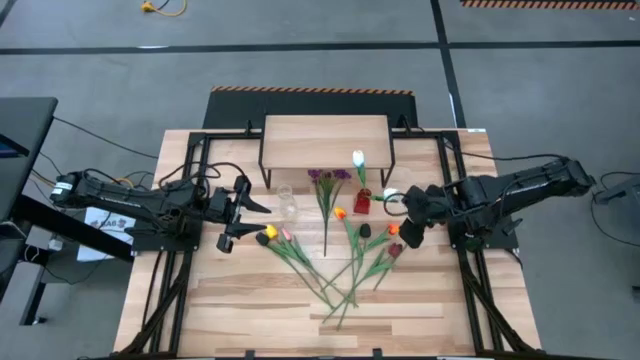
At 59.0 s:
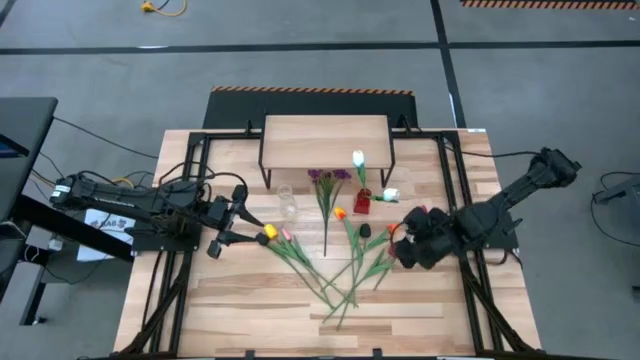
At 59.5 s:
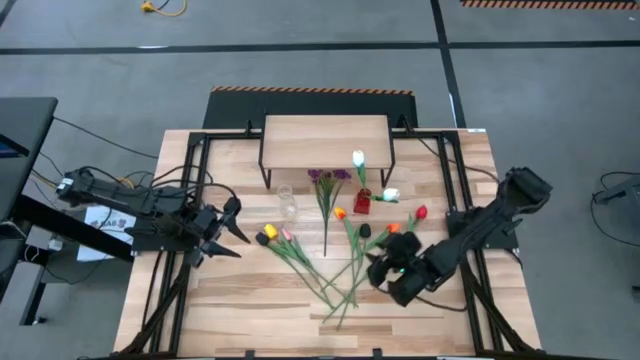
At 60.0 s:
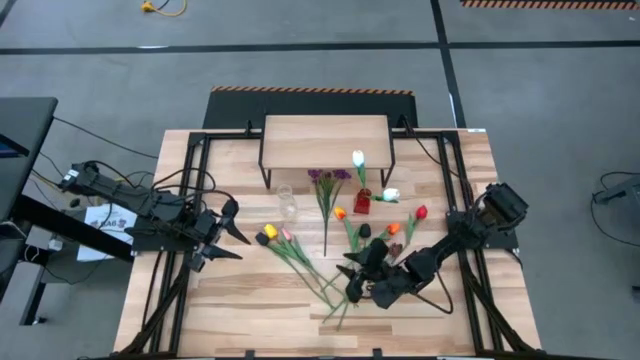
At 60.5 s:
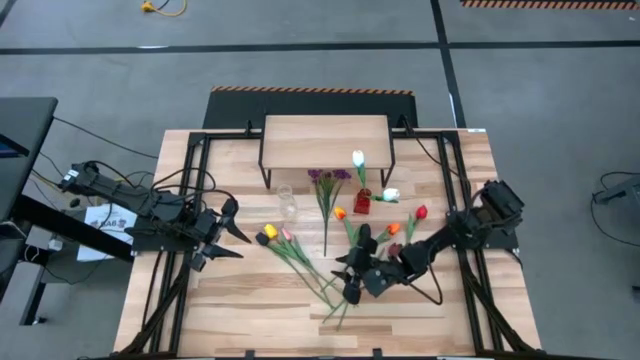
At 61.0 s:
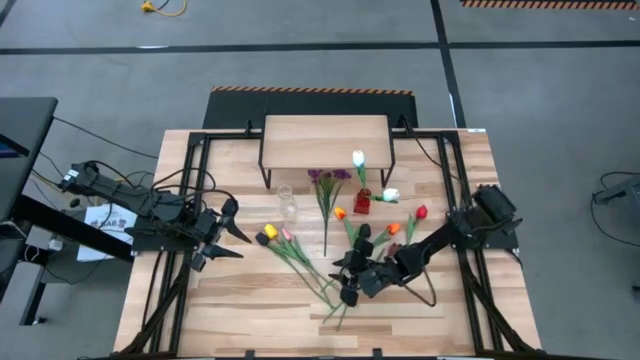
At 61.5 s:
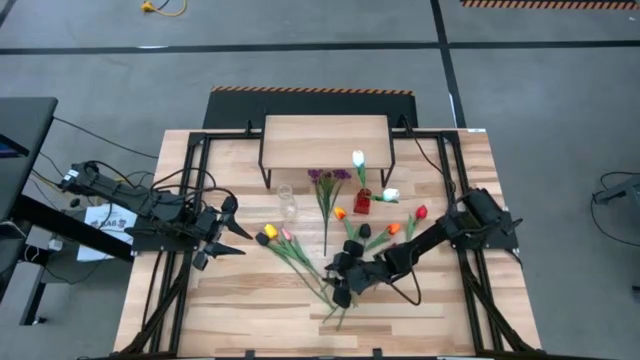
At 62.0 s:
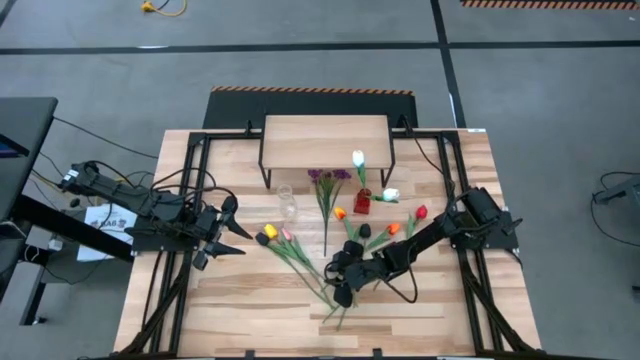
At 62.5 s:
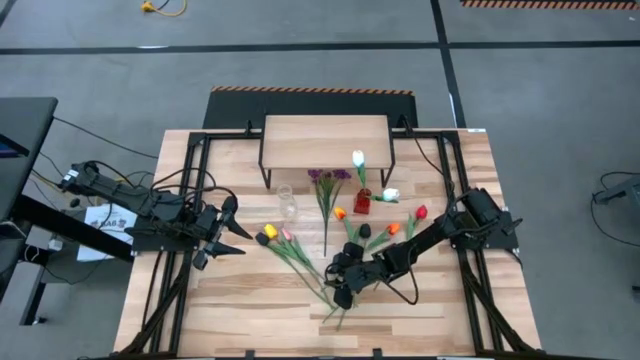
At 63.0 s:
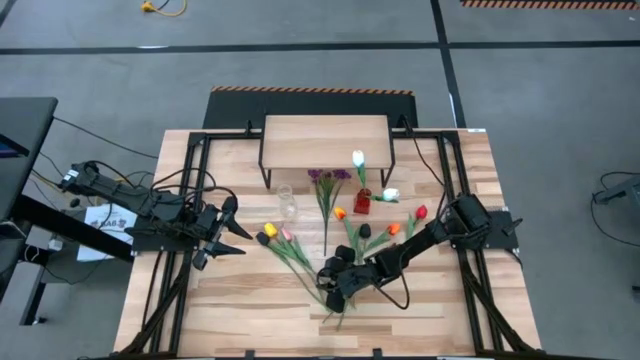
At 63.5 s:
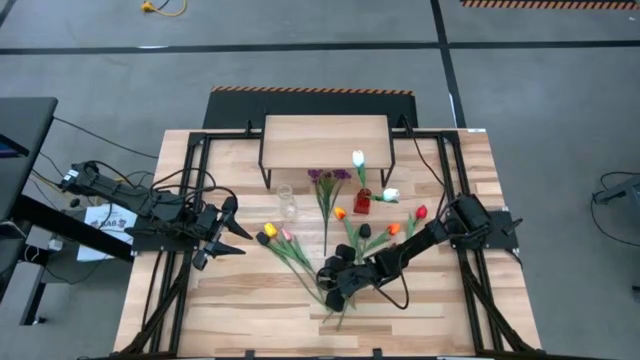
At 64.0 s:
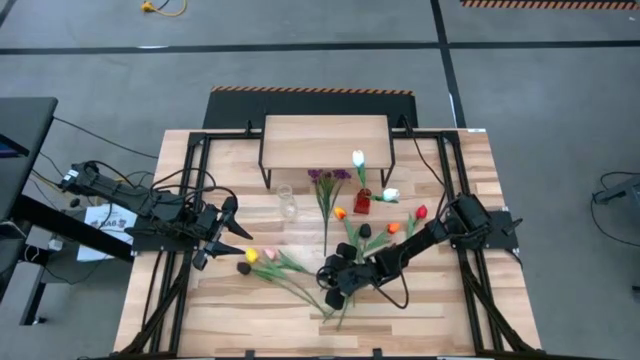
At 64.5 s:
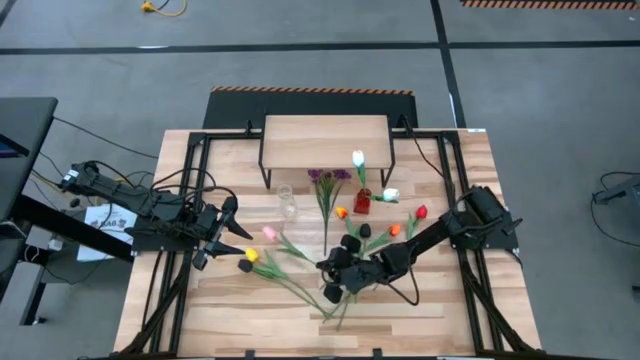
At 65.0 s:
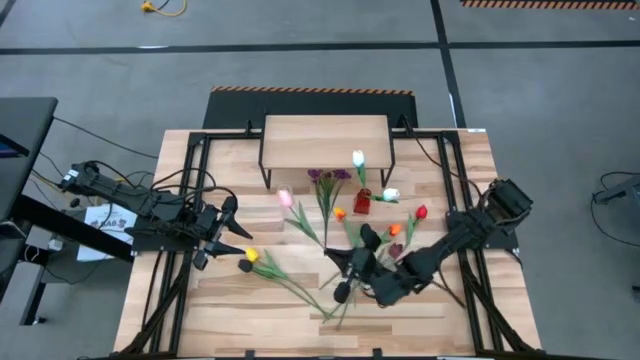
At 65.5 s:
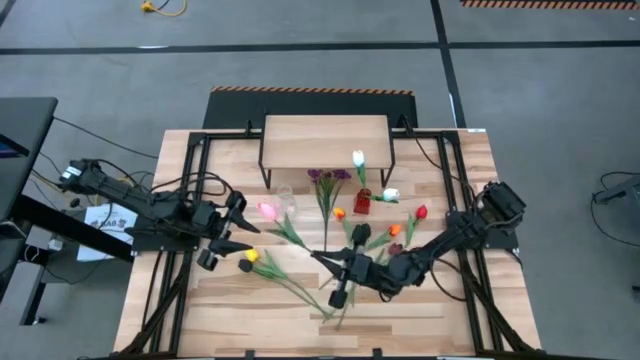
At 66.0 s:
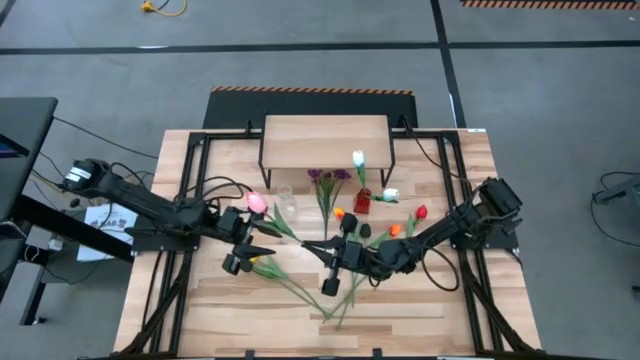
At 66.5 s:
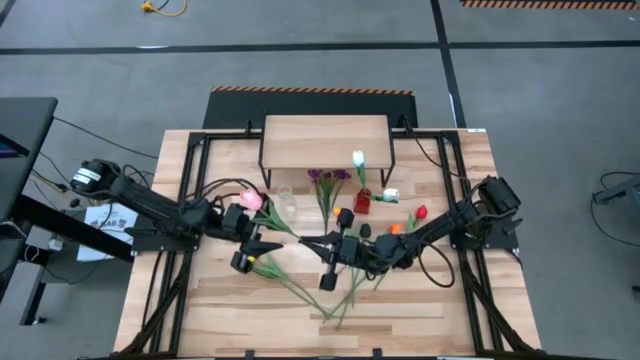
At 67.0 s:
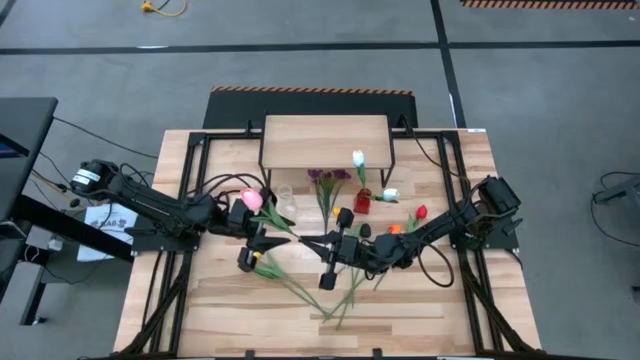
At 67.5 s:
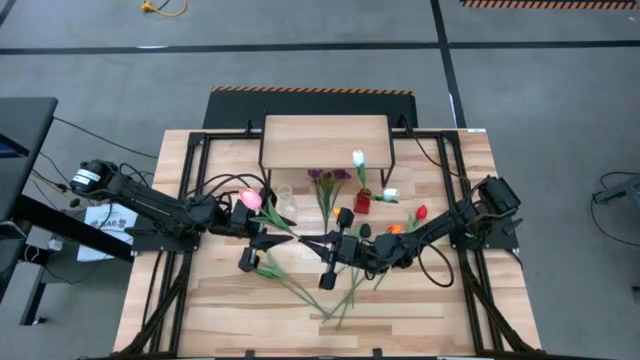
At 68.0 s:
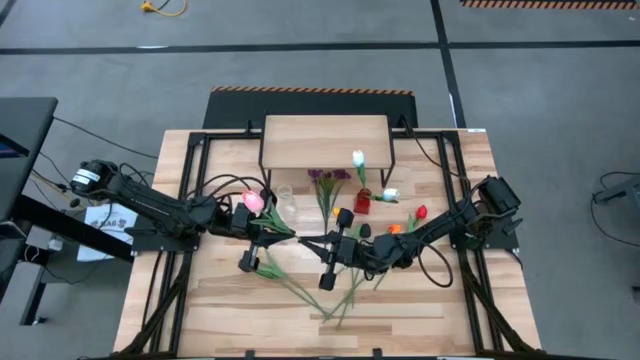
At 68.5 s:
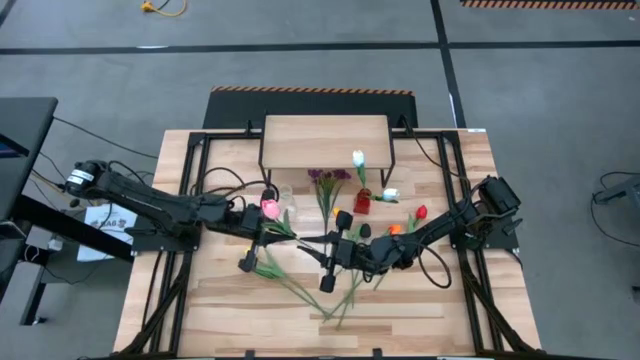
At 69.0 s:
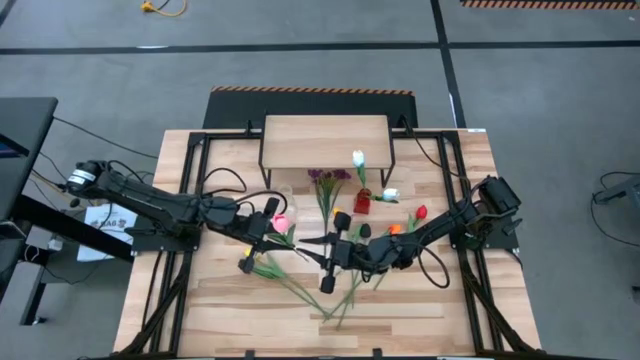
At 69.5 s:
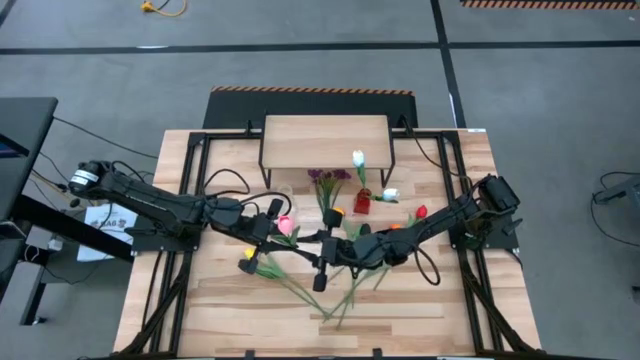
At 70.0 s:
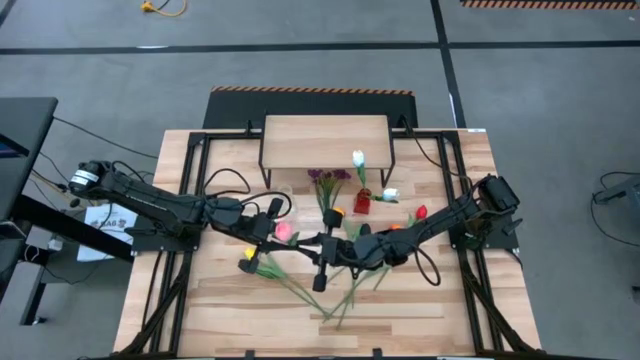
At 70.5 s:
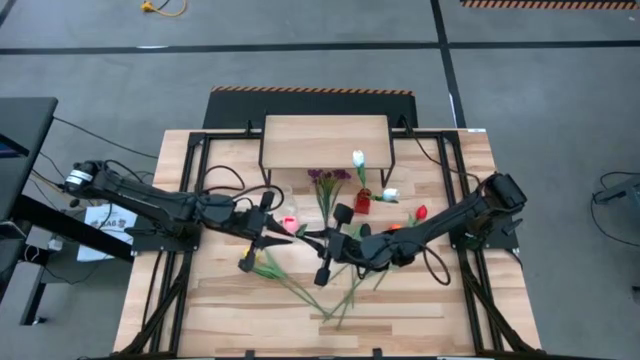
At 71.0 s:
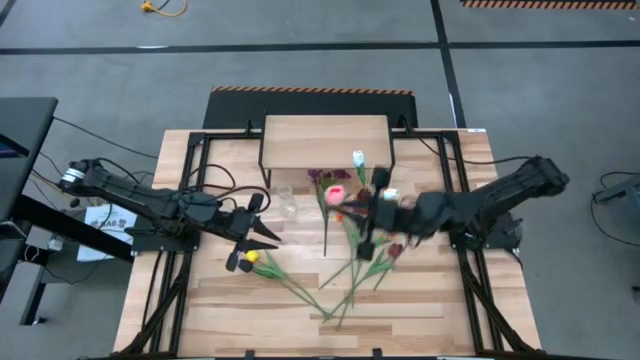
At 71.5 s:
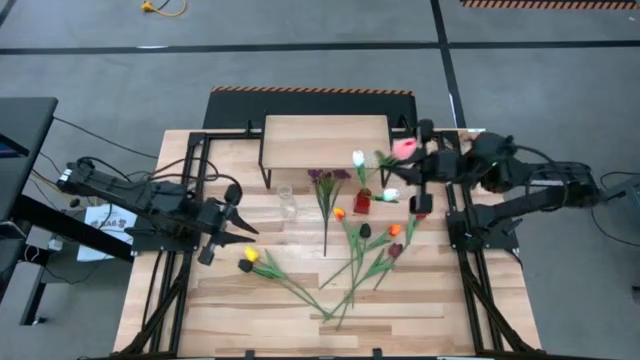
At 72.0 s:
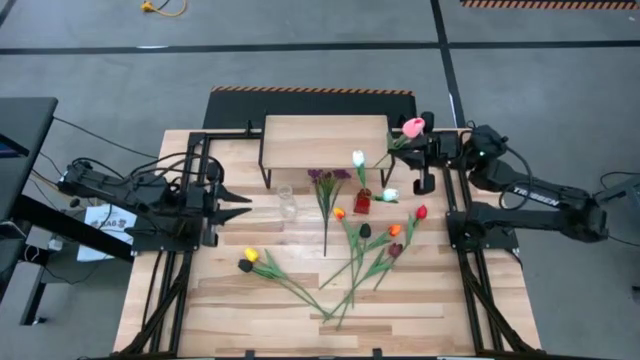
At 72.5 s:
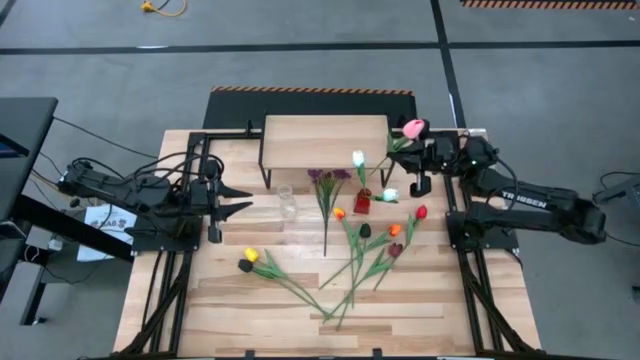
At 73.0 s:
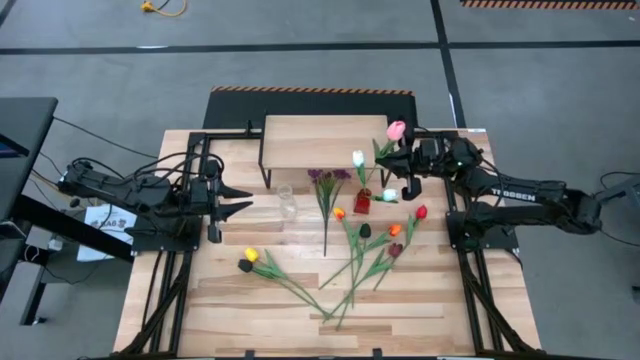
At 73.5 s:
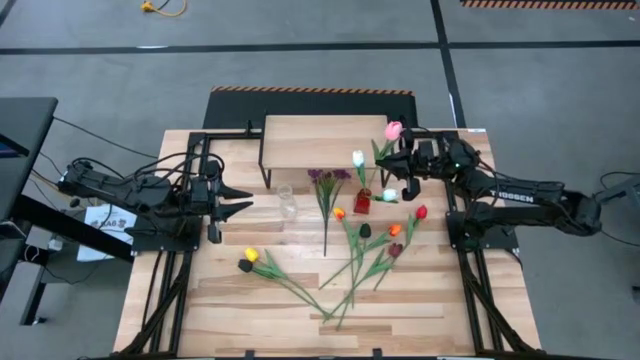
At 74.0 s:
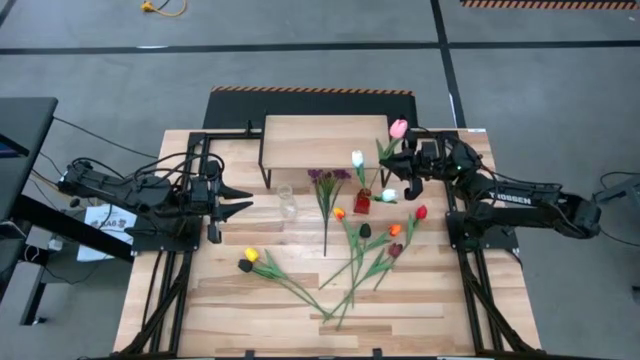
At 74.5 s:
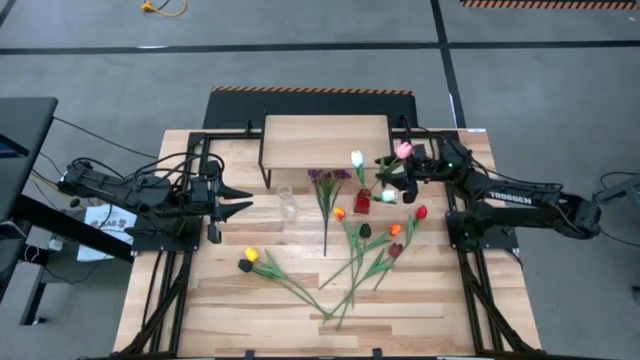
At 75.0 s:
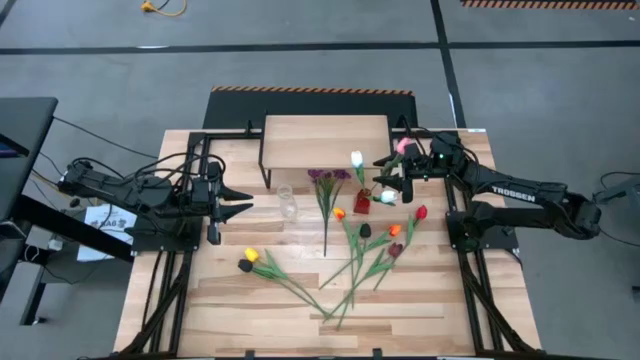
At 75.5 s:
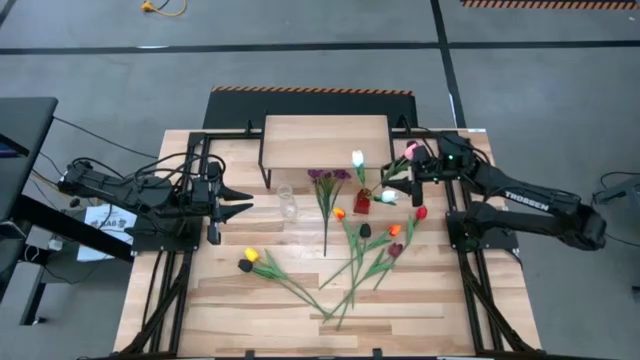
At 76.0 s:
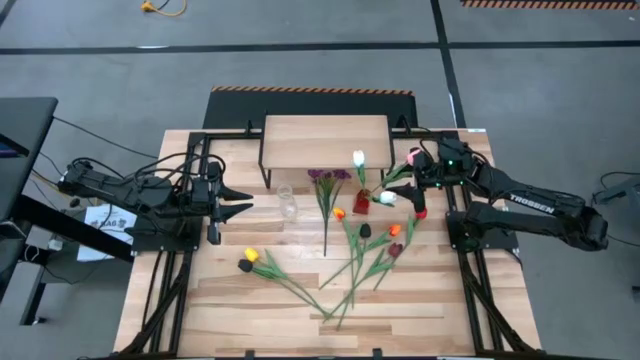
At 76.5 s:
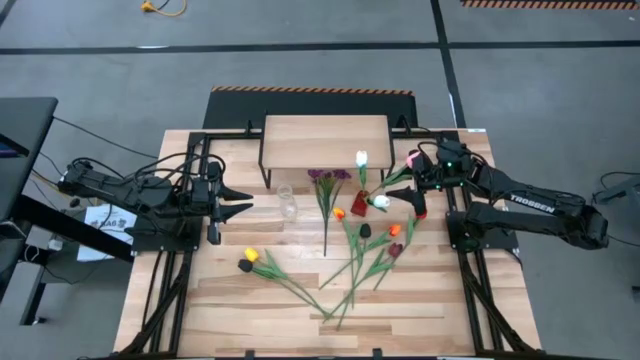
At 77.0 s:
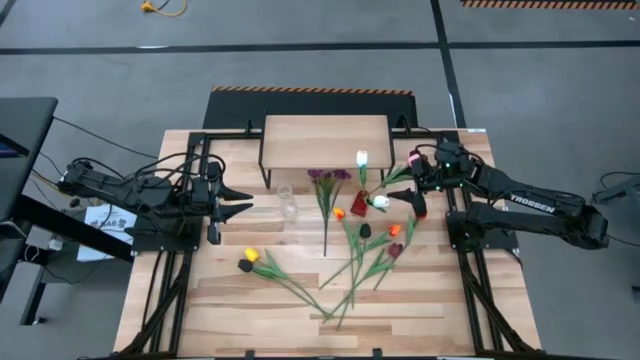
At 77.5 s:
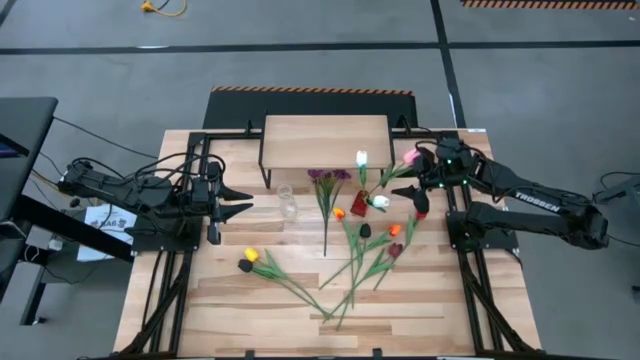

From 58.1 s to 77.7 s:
Task: Pick and place flowers into a vace then onto a shelf
Put the pink flower into the red flower vase

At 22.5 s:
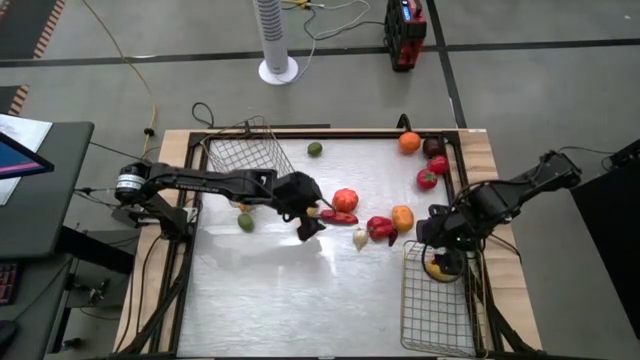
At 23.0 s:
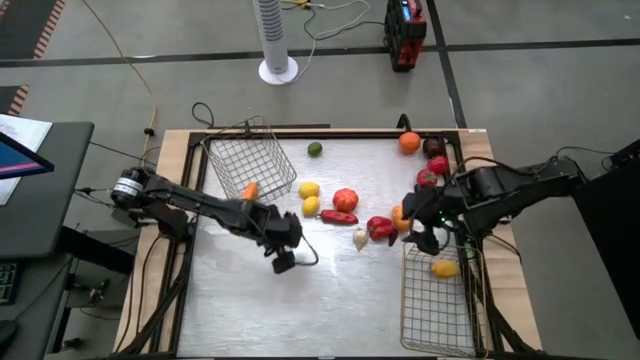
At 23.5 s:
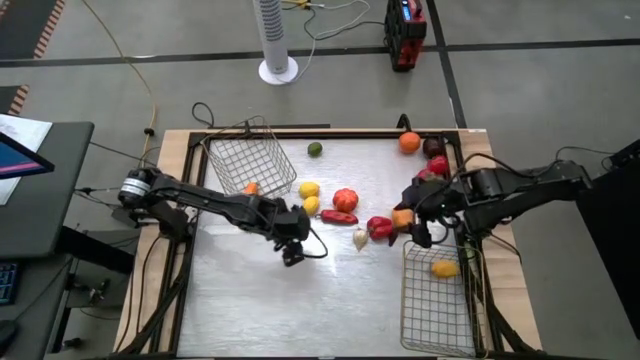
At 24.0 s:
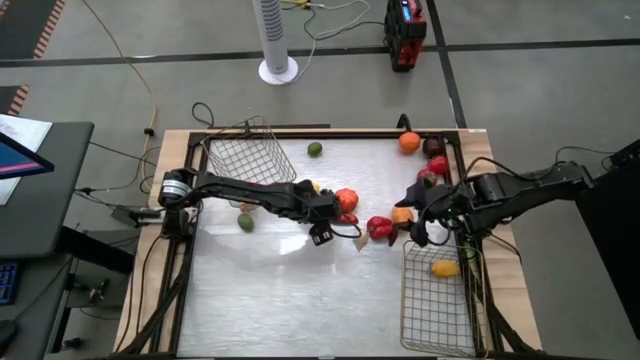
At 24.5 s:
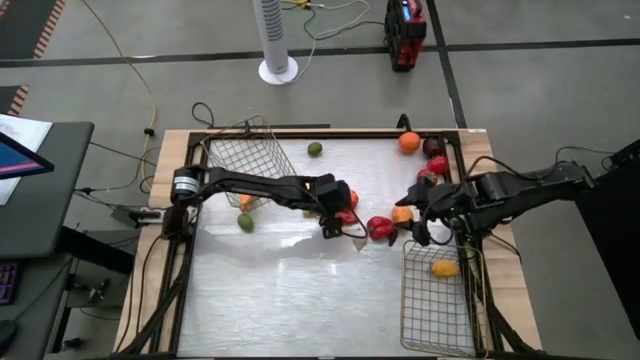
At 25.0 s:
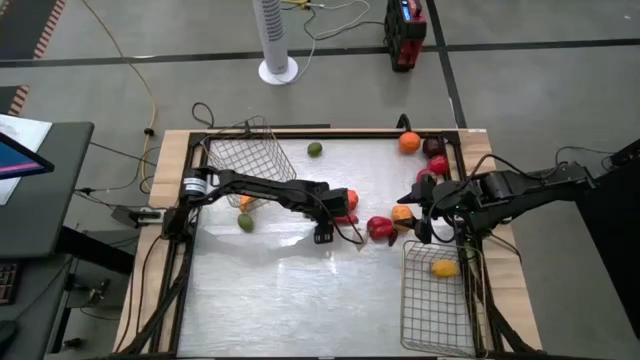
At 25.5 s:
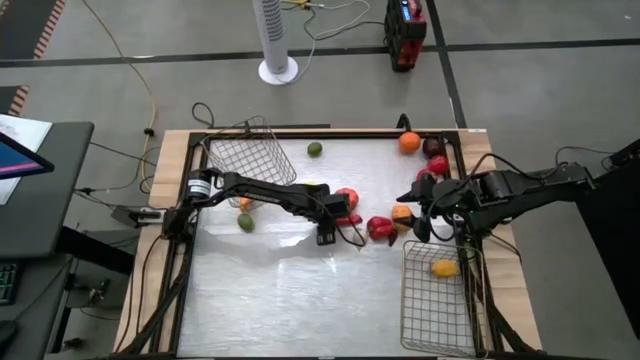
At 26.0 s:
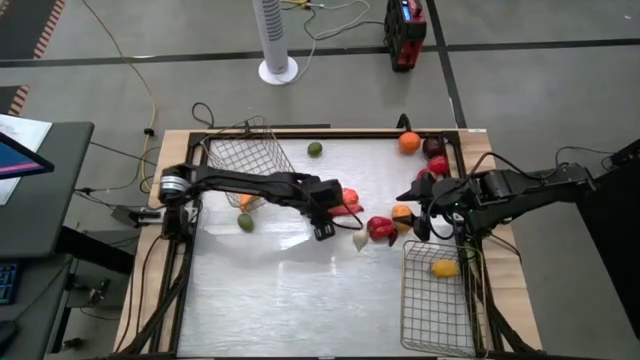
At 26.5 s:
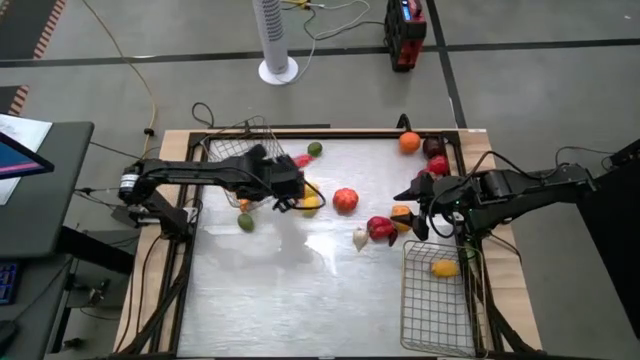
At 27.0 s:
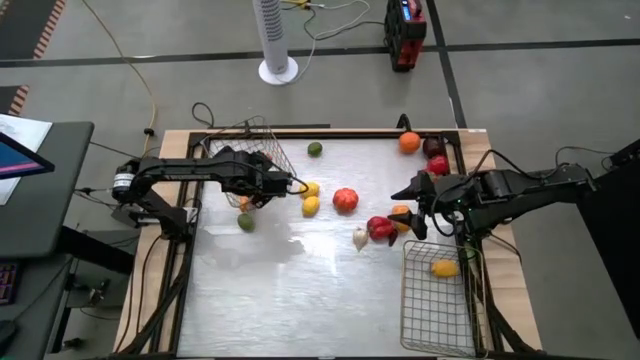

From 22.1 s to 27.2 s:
Task: Sort produce into baskets
Put the red chili pepper into the top wire basket
